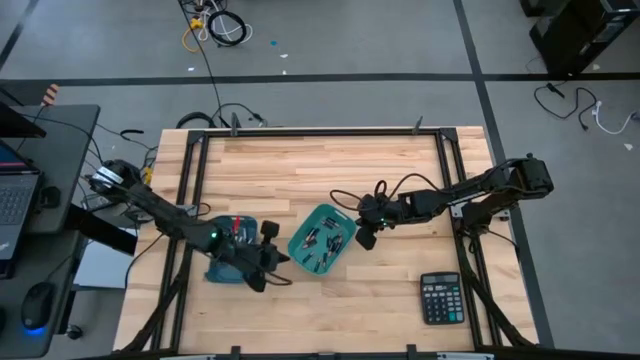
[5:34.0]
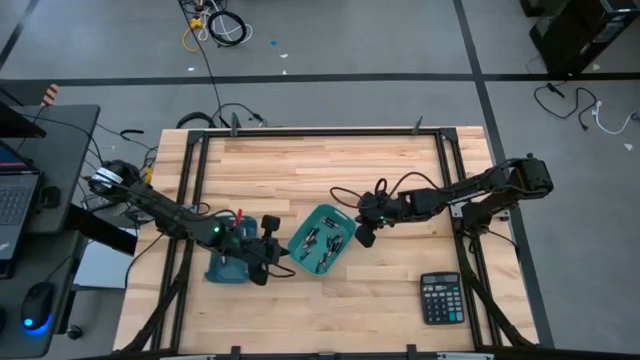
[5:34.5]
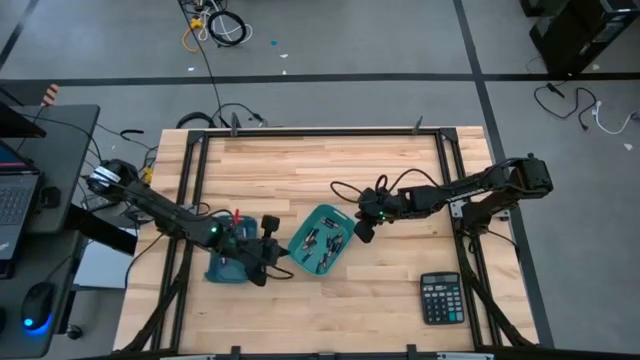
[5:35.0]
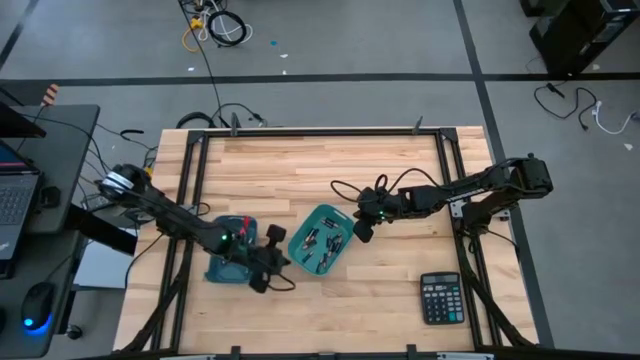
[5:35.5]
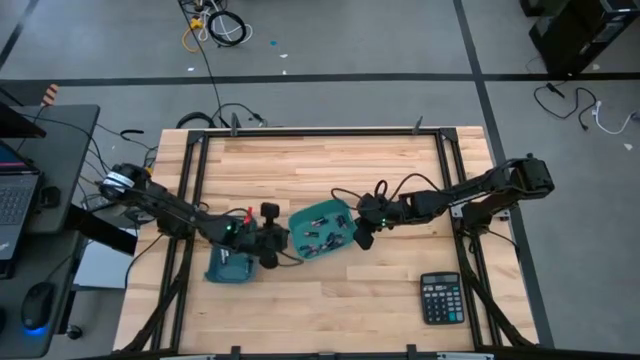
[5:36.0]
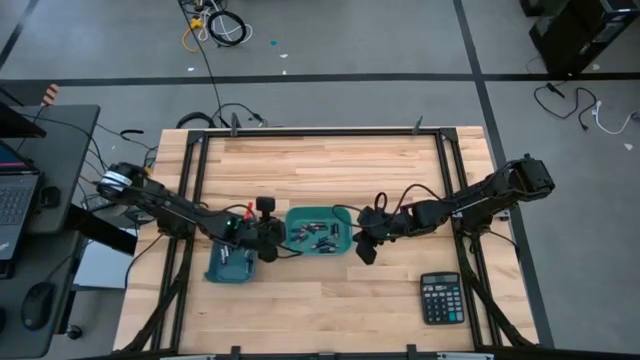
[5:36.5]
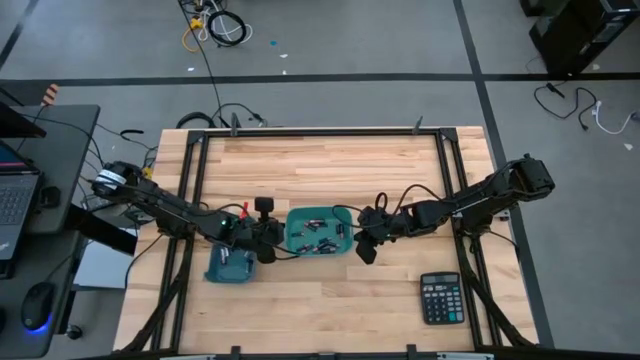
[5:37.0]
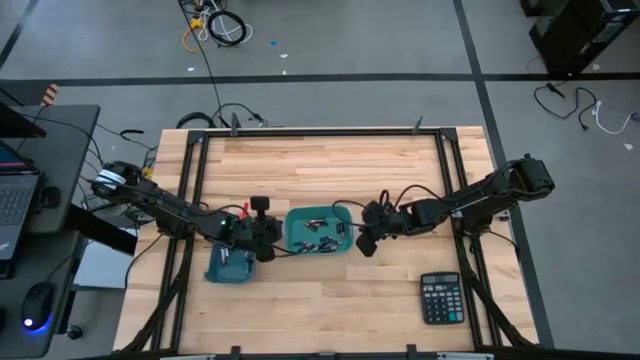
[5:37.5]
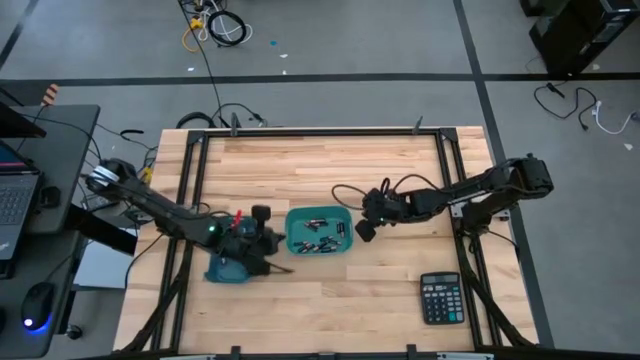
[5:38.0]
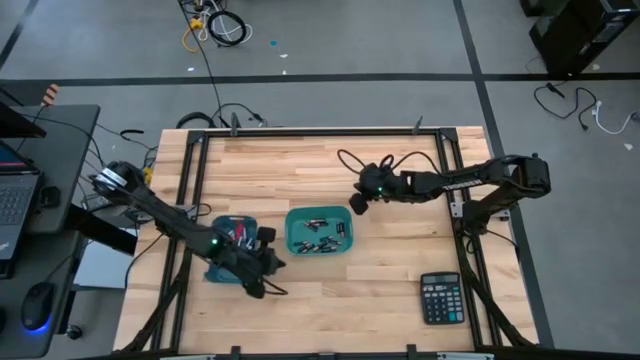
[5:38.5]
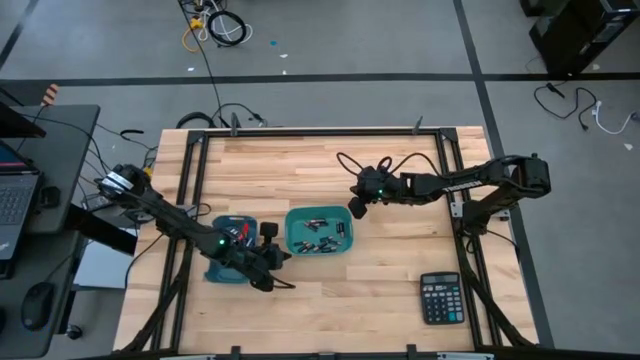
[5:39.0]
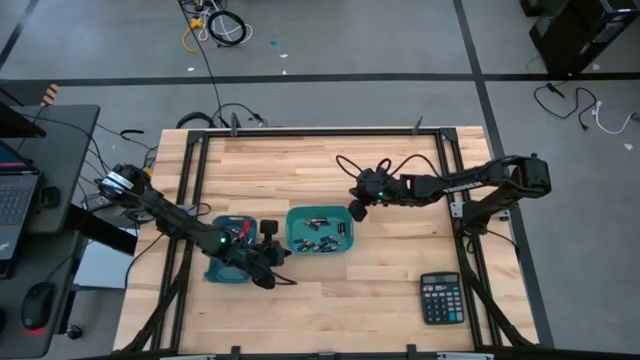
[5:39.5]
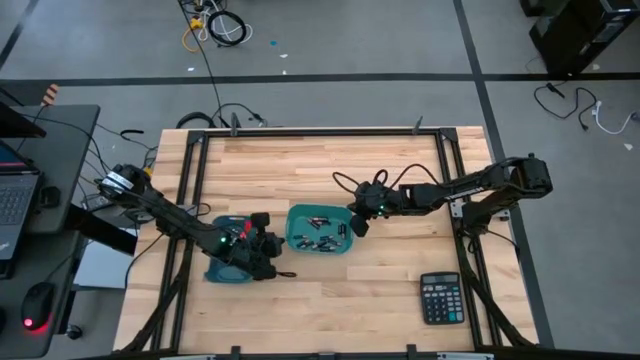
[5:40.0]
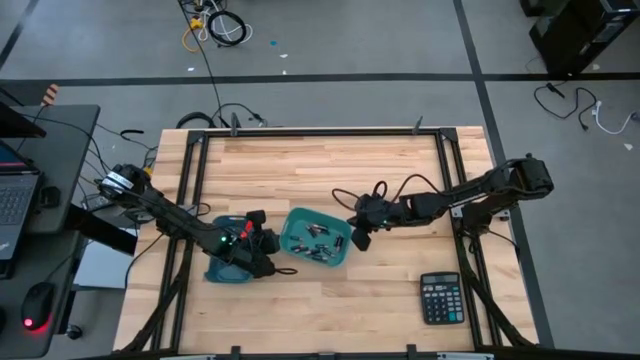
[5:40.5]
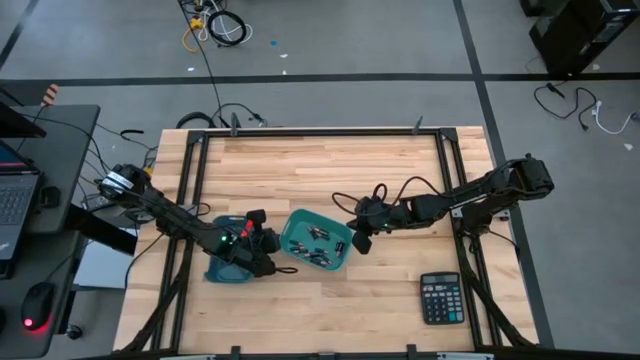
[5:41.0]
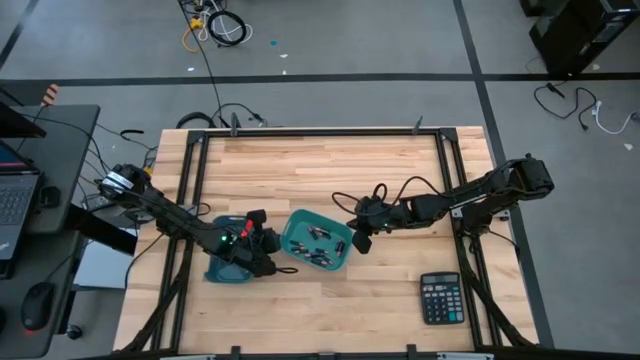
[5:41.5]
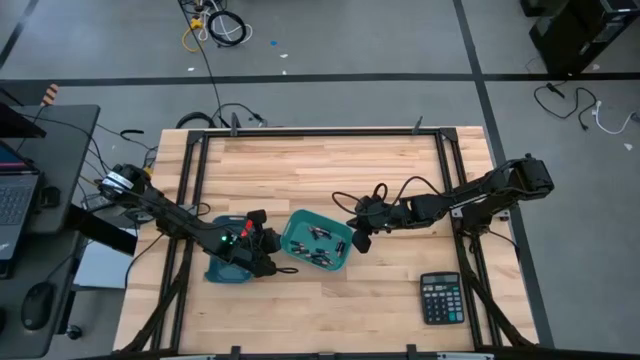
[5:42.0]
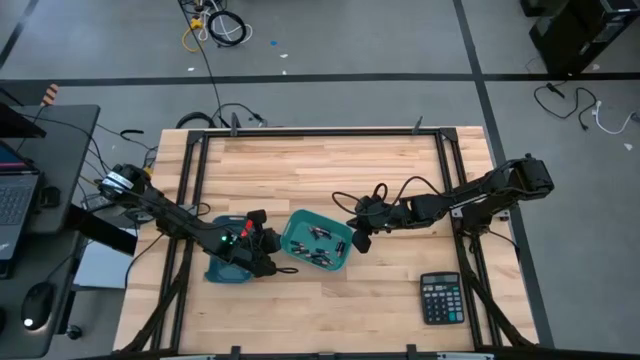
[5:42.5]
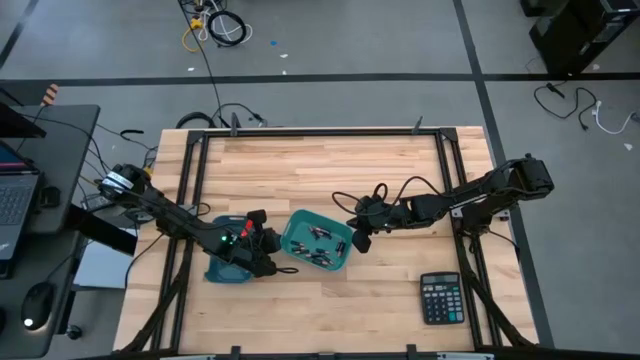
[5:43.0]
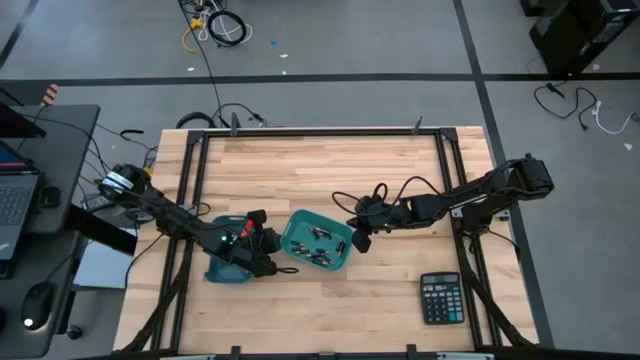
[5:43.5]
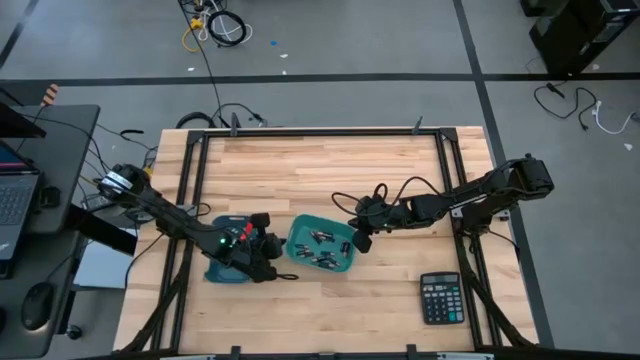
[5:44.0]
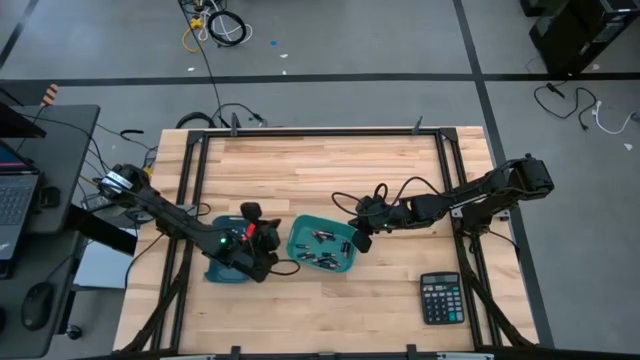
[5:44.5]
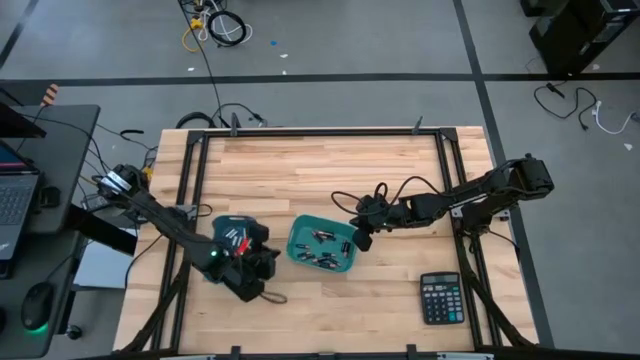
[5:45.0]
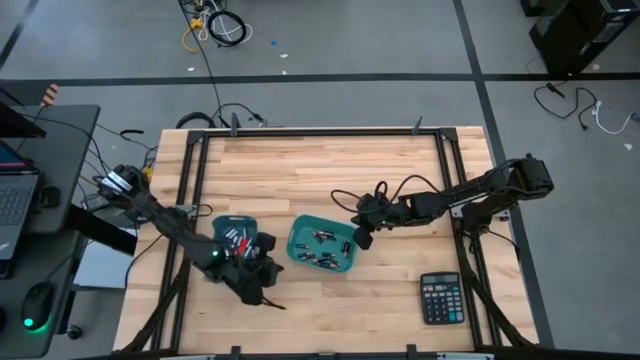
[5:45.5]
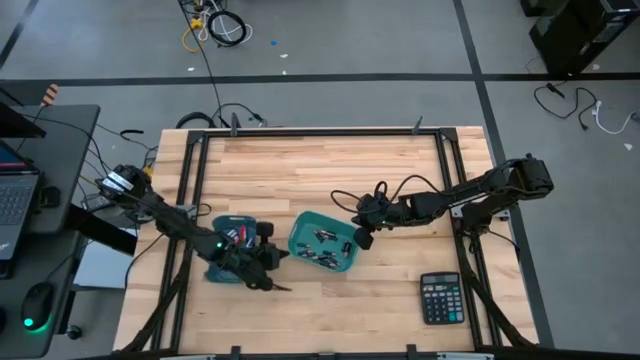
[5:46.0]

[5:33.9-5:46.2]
Task: Sort batteries
Adjust the bins

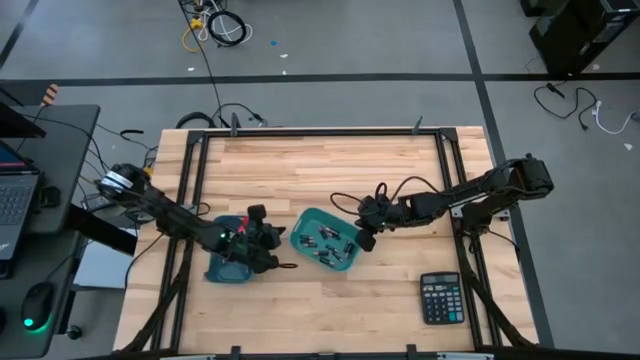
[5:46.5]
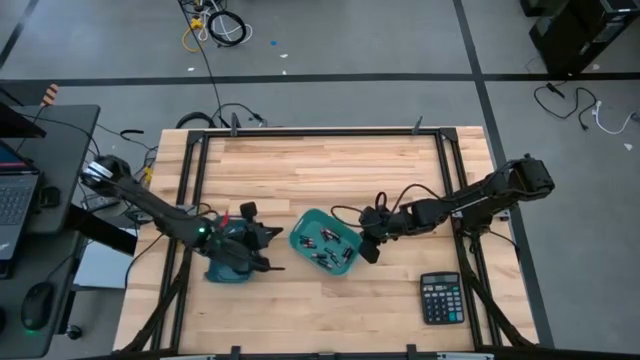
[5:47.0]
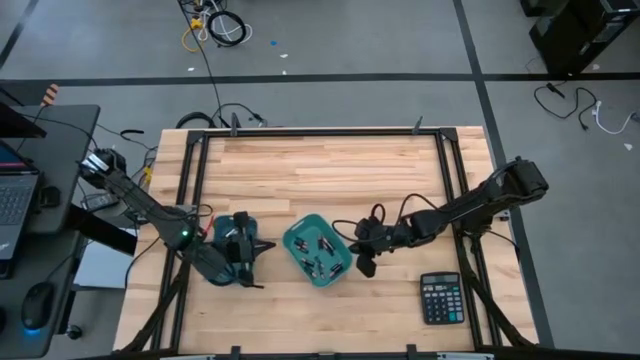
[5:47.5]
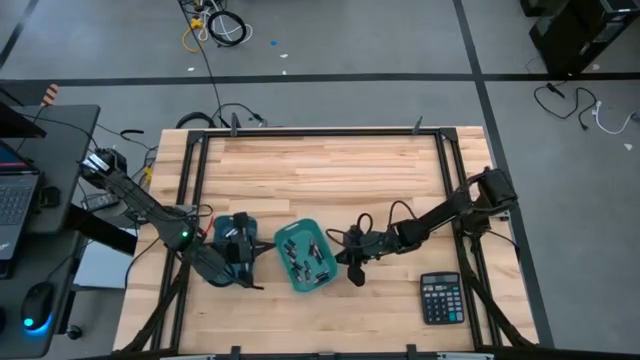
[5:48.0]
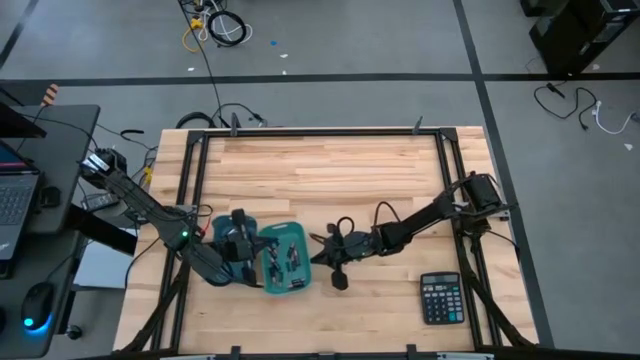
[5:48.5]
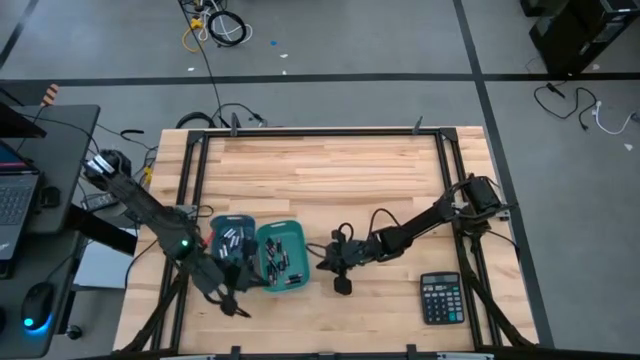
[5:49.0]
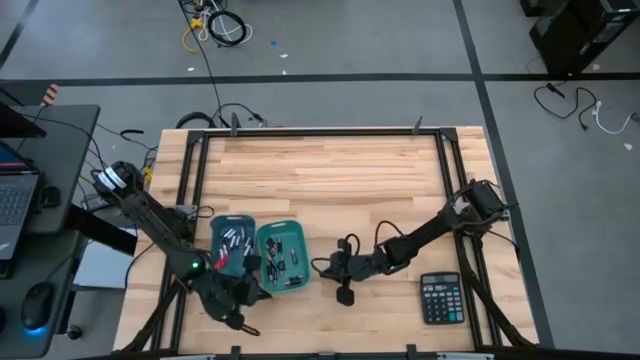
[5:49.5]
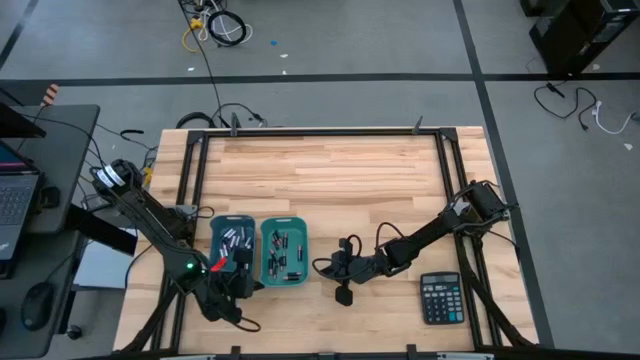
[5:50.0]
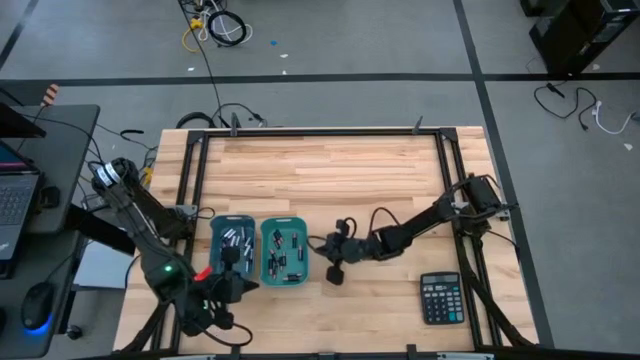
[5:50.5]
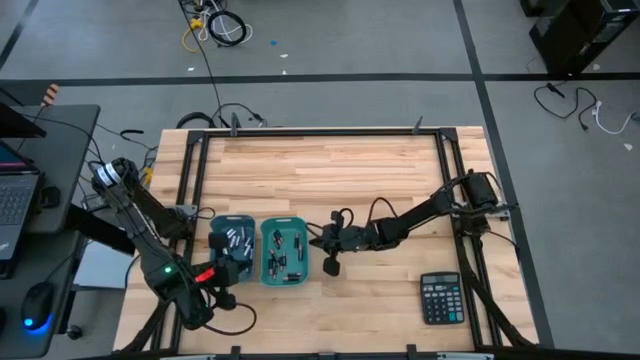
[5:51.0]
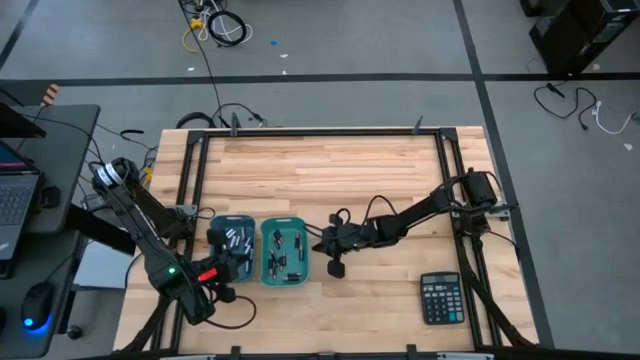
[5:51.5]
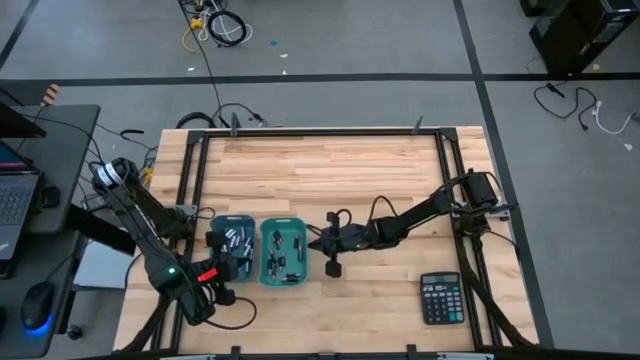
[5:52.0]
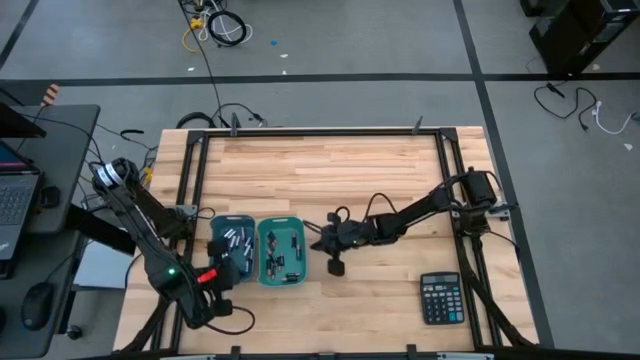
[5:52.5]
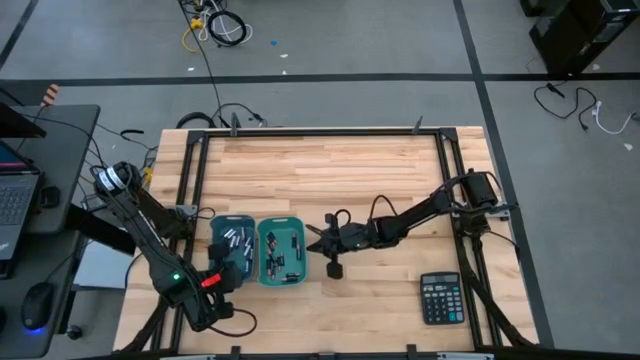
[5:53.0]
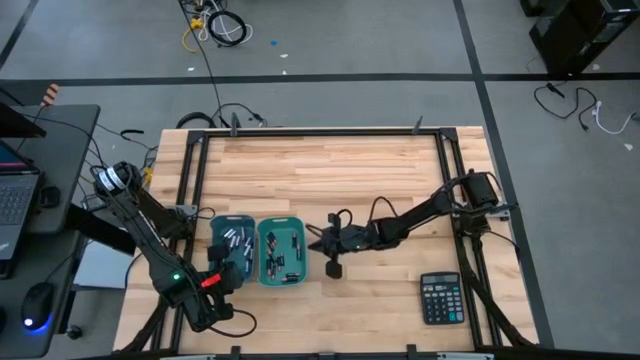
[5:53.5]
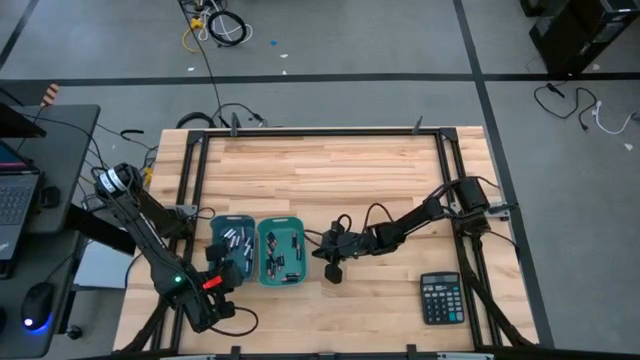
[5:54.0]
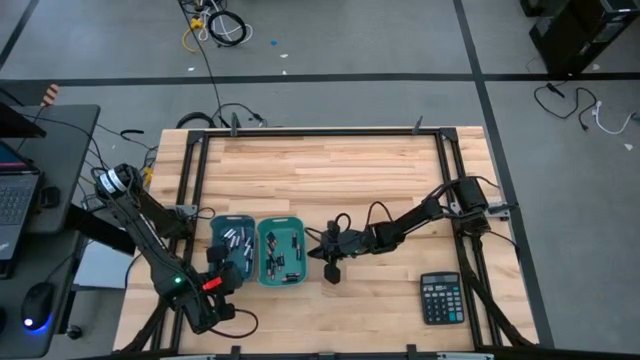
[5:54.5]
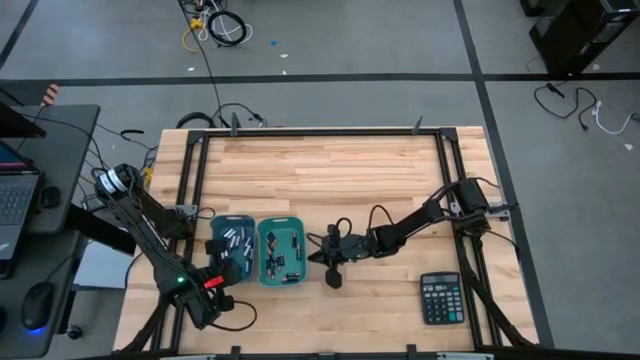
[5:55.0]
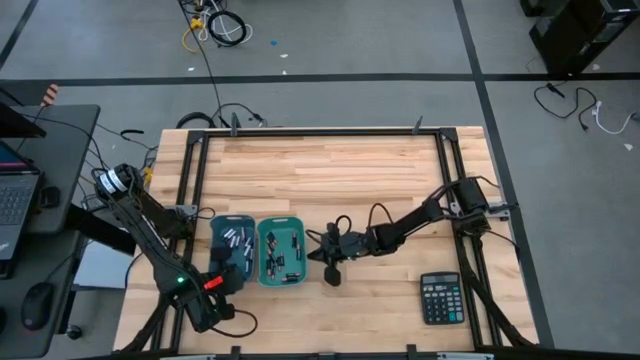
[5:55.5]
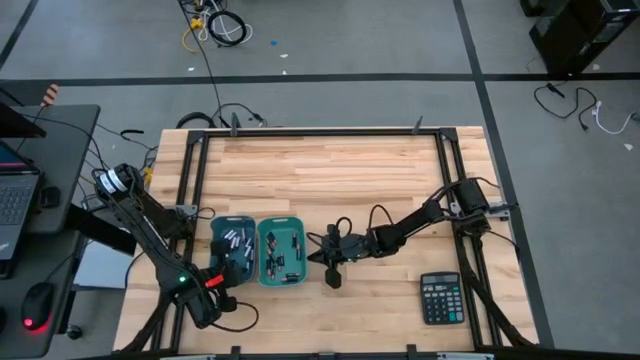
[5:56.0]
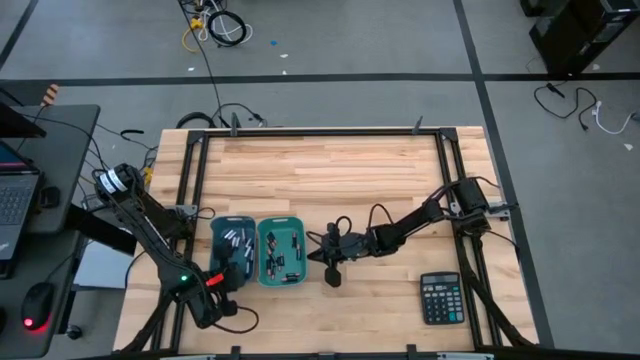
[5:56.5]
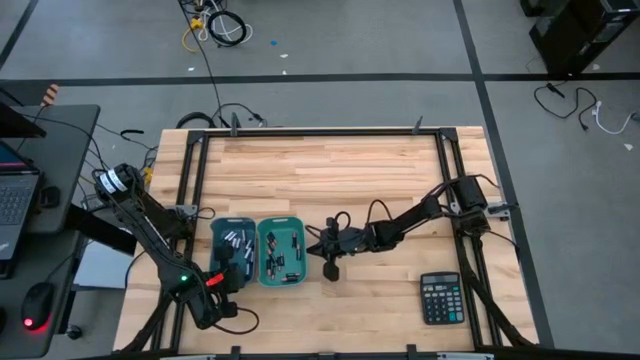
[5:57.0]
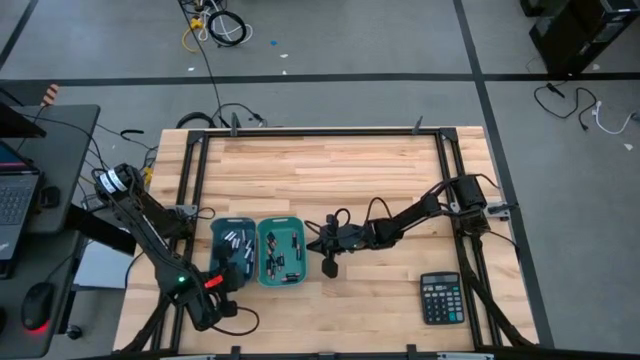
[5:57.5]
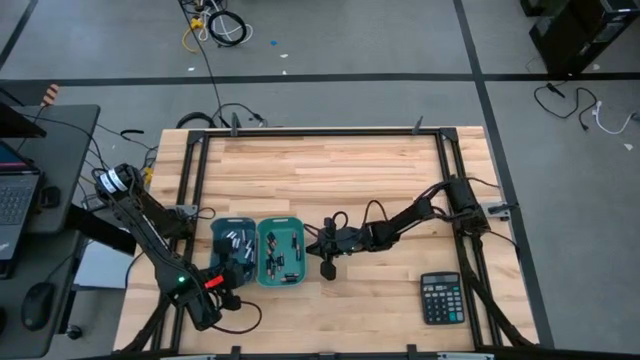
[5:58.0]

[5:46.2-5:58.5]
Adjust the bins
